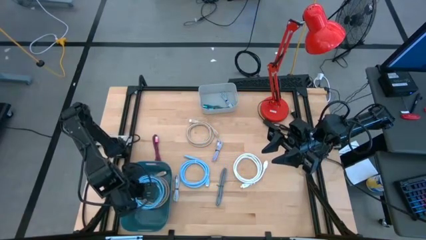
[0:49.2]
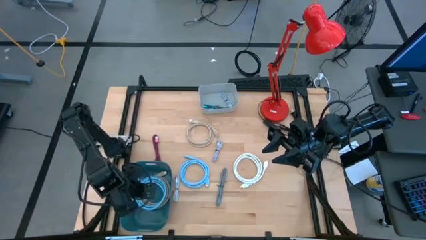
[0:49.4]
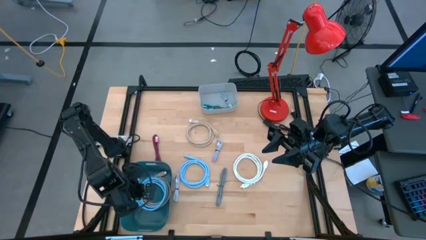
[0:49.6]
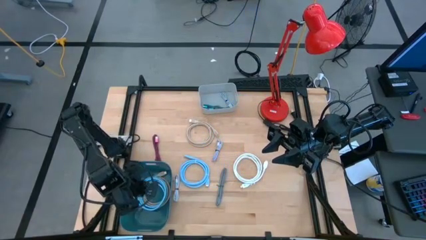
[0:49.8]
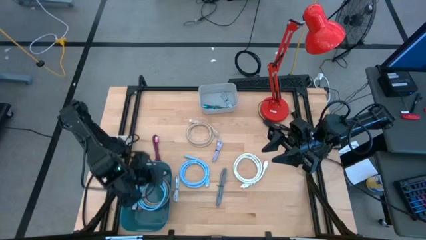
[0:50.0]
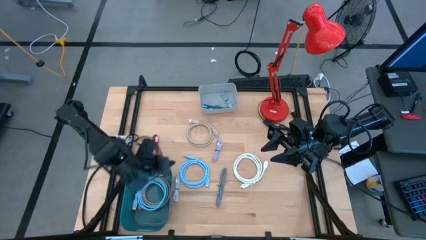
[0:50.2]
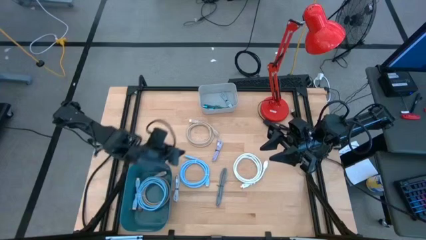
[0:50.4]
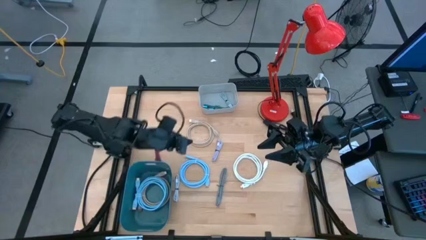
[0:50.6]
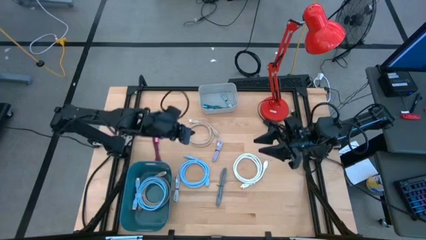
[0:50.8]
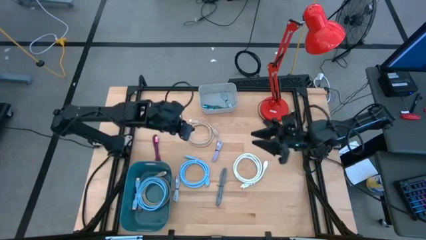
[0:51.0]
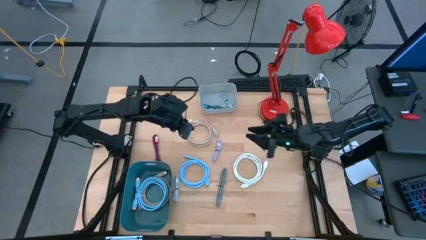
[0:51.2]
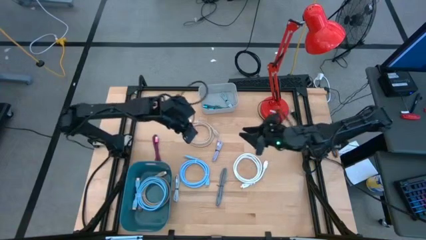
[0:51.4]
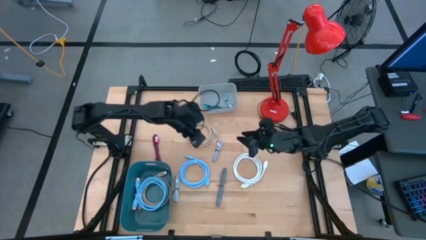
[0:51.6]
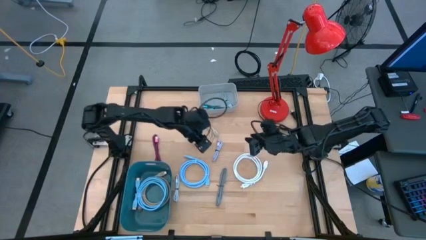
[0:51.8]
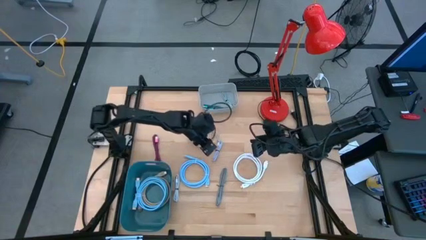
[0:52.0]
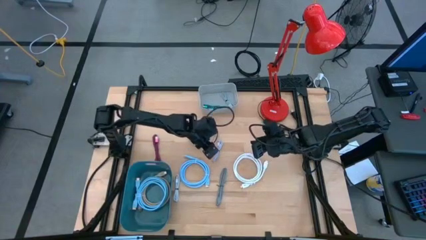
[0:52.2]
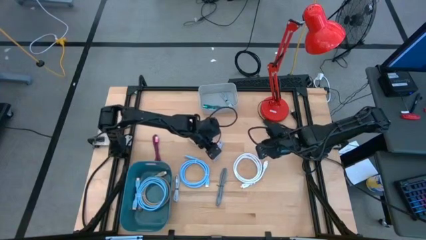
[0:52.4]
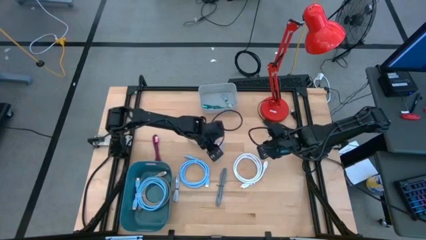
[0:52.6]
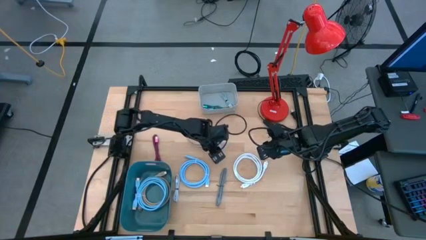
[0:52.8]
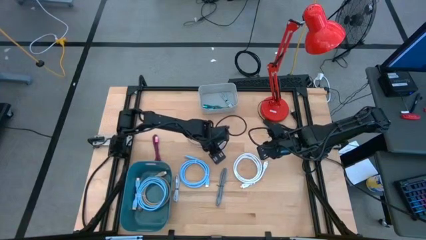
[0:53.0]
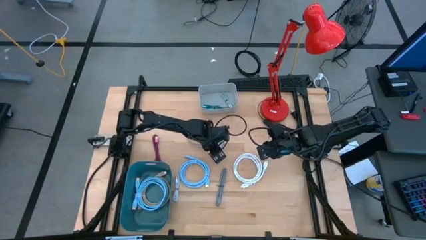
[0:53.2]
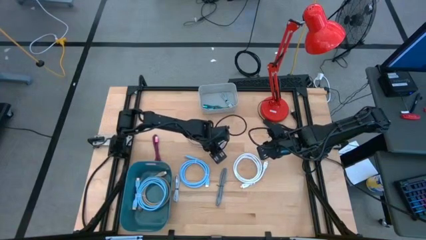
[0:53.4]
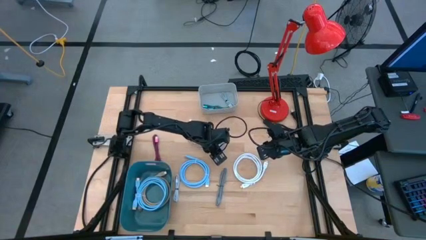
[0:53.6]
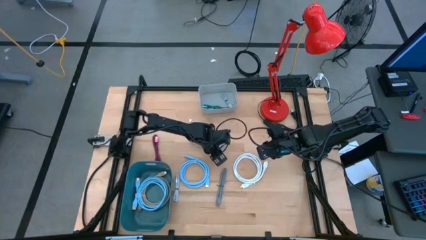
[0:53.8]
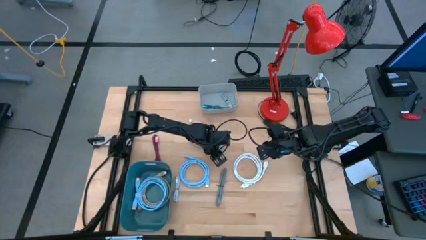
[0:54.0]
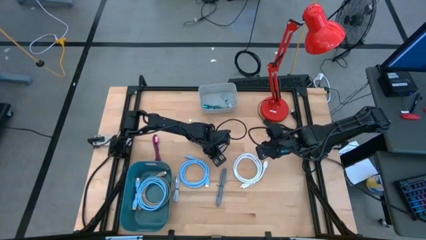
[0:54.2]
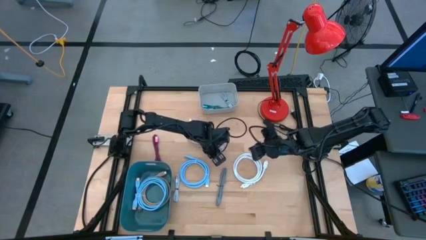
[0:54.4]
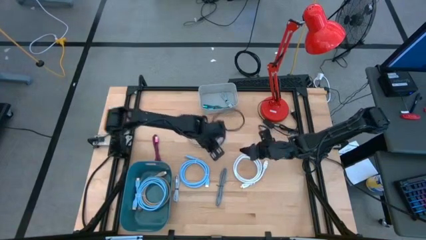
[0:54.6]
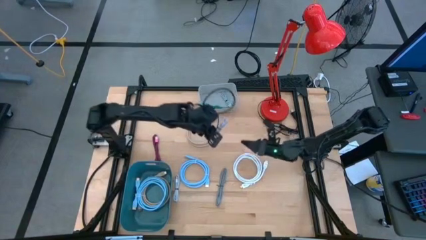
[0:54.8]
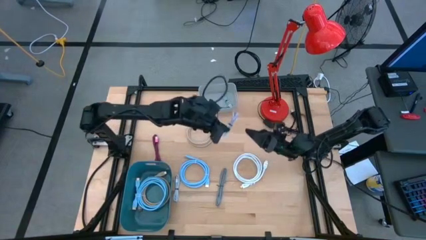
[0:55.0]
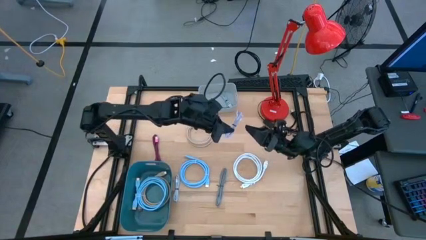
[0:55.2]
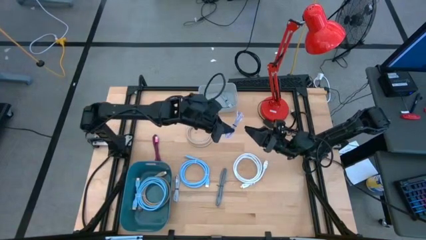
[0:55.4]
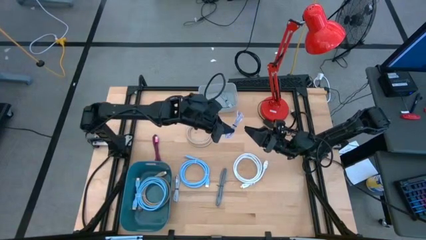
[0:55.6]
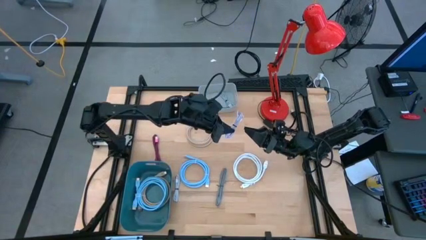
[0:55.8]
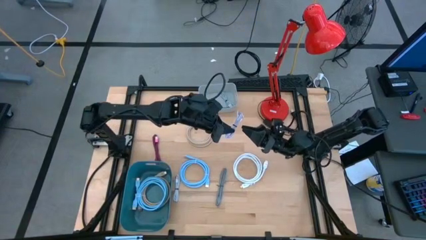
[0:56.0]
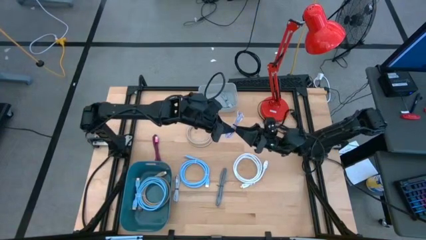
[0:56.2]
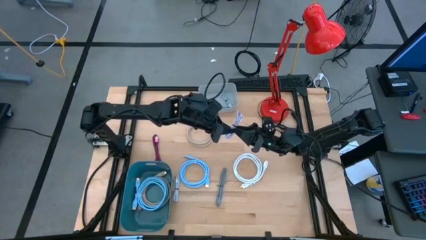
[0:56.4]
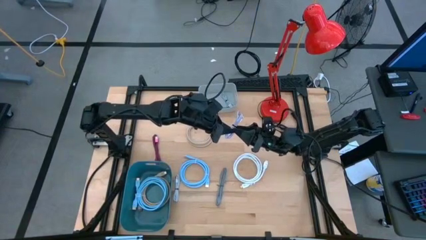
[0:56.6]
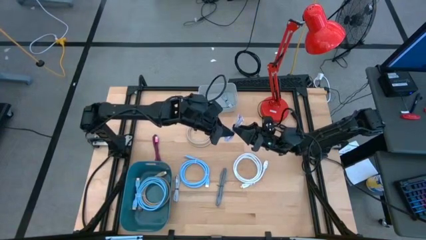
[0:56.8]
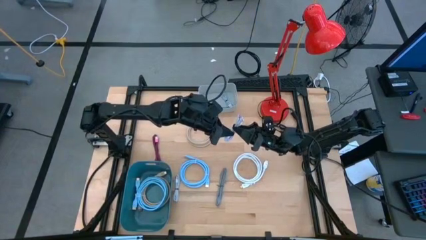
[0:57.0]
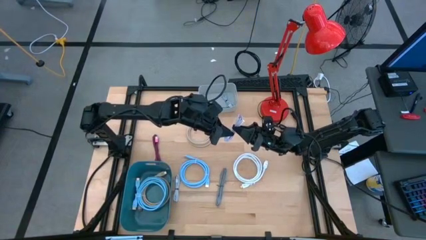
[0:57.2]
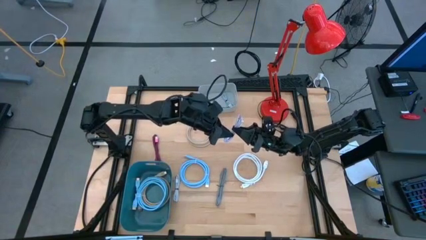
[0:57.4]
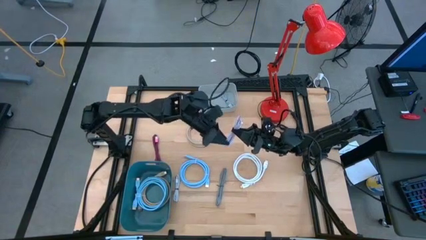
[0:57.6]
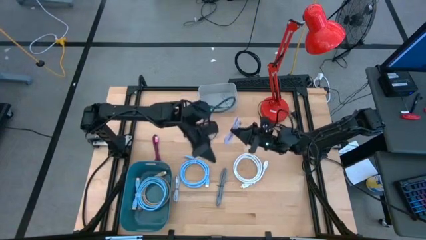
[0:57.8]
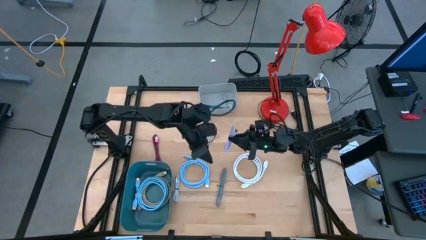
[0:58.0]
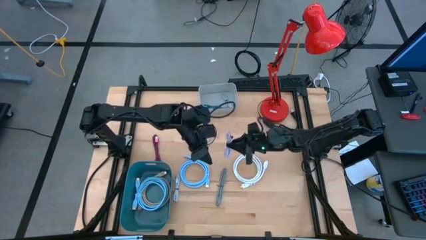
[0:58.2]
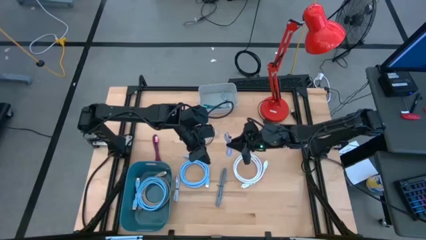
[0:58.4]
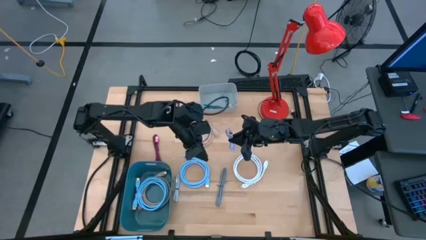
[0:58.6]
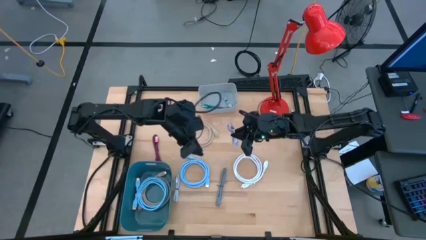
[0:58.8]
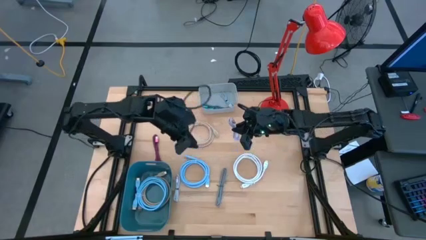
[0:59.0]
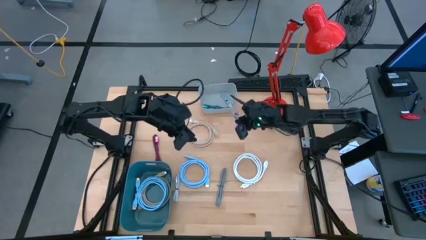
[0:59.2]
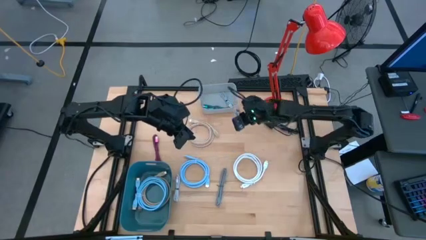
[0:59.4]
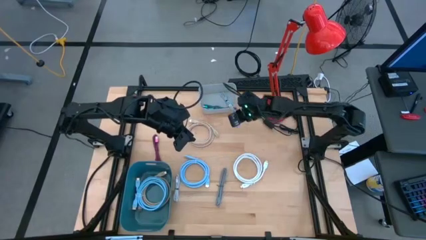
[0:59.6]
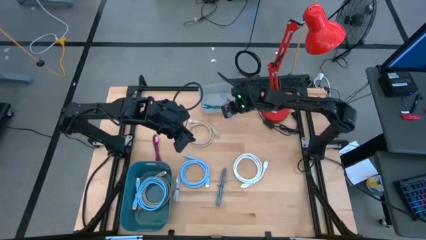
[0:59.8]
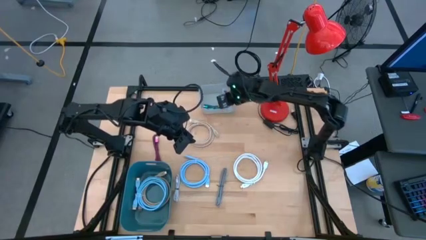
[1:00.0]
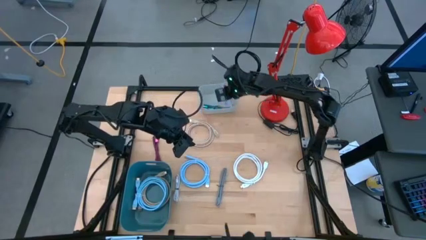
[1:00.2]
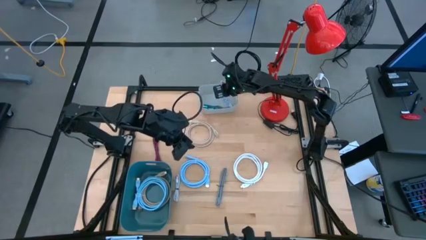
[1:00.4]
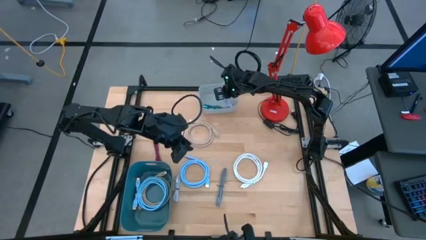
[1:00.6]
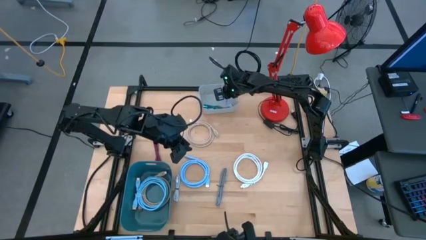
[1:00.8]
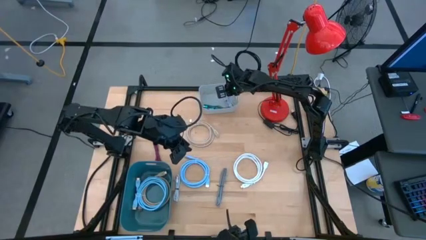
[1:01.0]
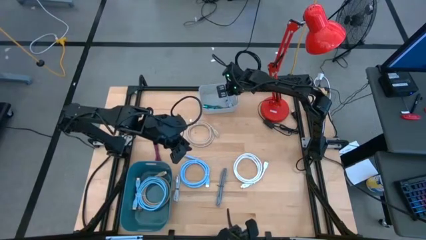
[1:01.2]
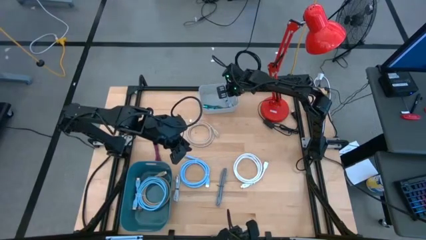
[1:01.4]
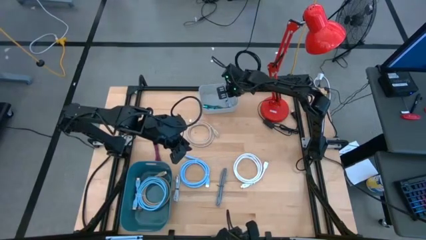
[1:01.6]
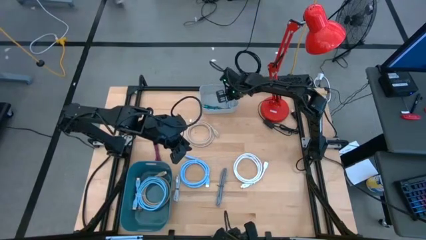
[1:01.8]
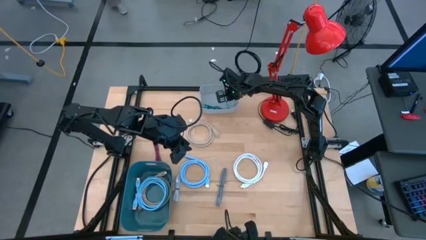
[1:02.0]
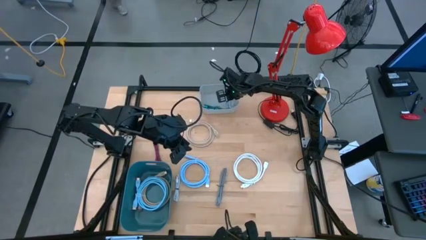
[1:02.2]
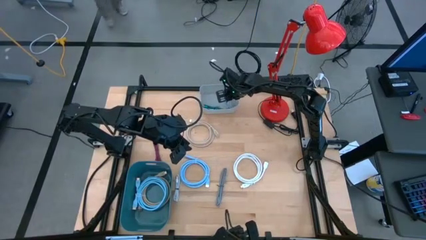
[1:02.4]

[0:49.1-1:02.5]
Task: Pick & Place USB Port
Put the purple charger cable into the gray bin

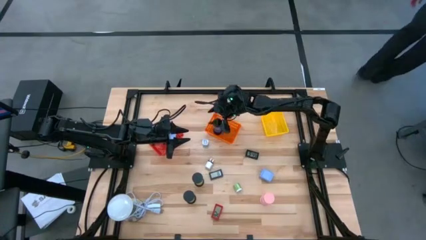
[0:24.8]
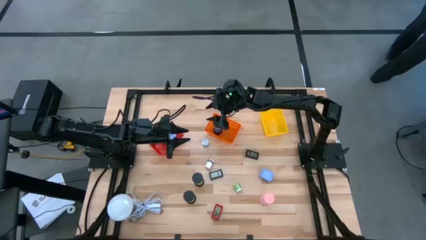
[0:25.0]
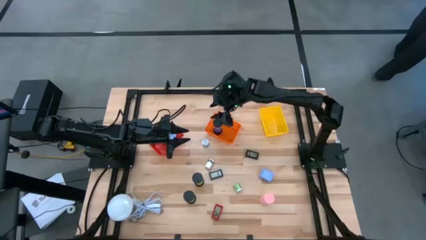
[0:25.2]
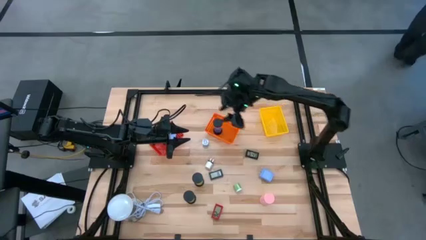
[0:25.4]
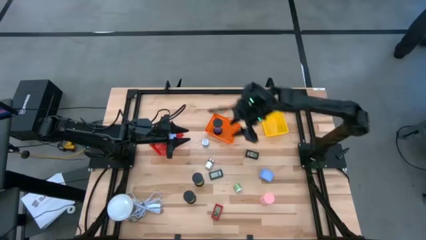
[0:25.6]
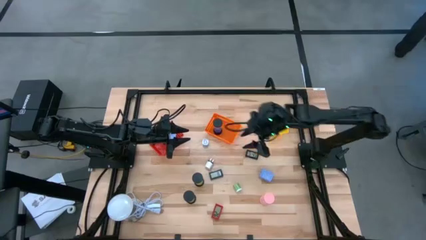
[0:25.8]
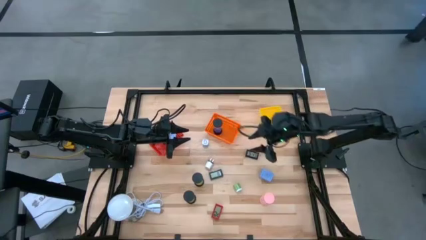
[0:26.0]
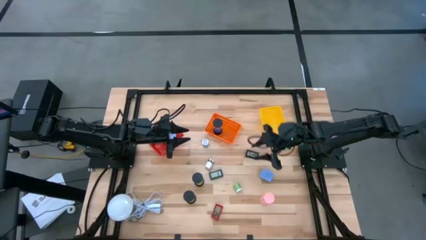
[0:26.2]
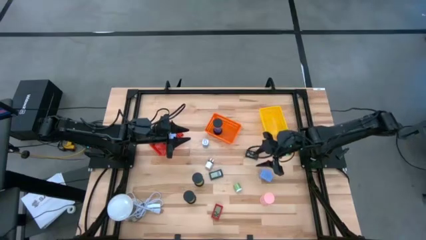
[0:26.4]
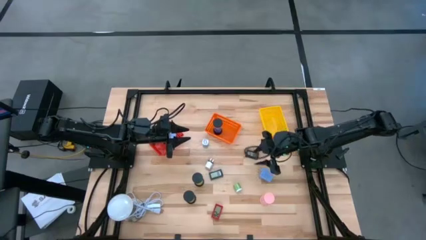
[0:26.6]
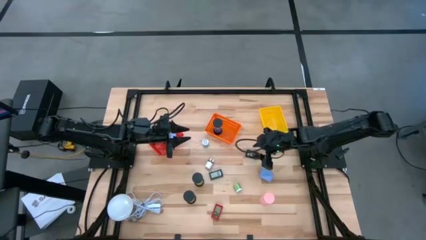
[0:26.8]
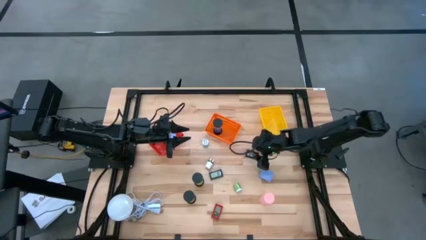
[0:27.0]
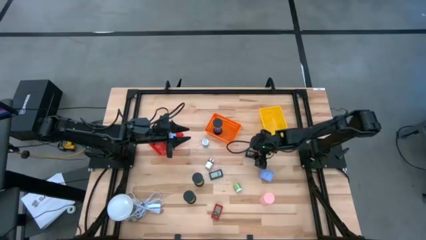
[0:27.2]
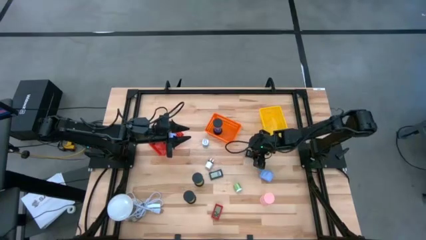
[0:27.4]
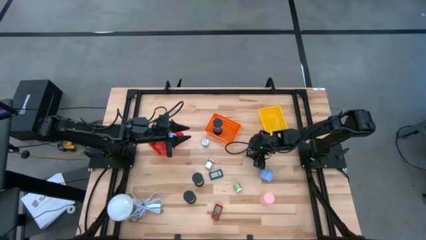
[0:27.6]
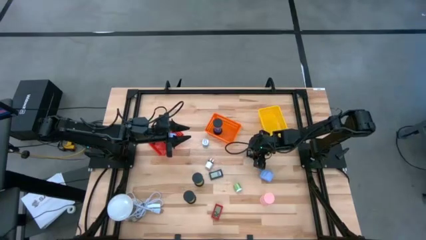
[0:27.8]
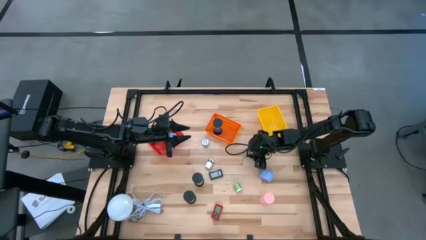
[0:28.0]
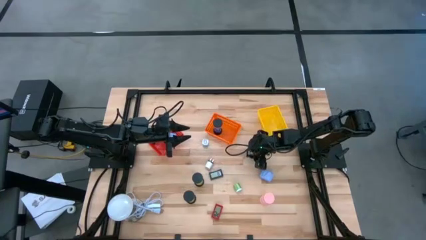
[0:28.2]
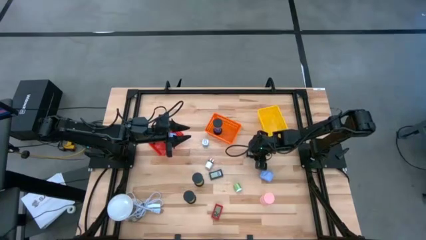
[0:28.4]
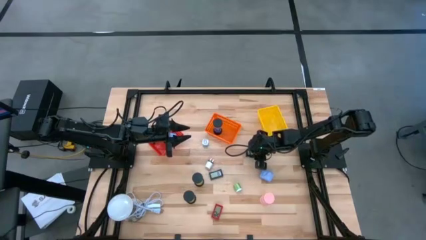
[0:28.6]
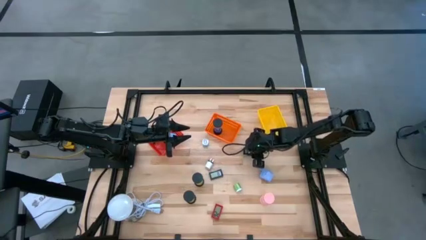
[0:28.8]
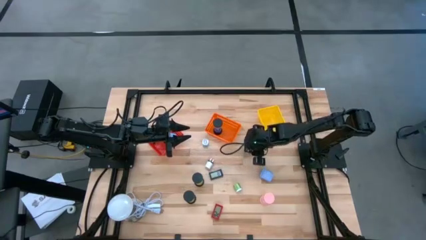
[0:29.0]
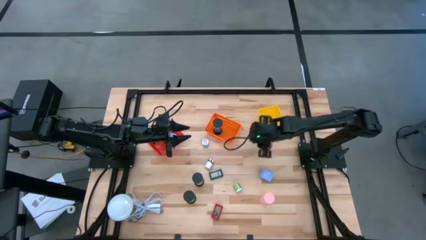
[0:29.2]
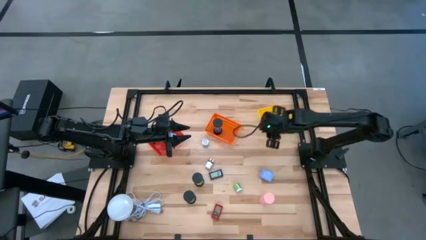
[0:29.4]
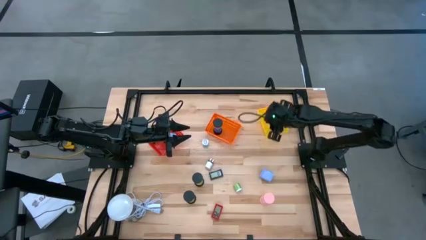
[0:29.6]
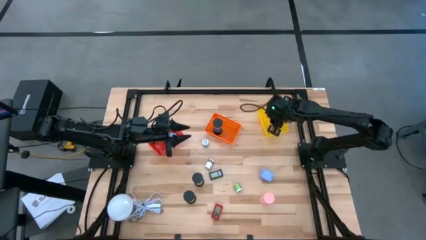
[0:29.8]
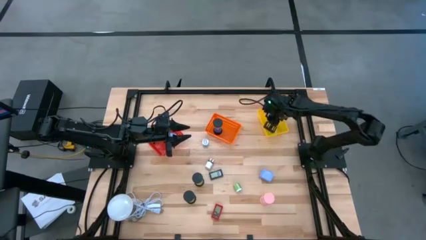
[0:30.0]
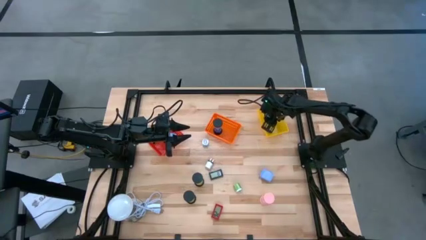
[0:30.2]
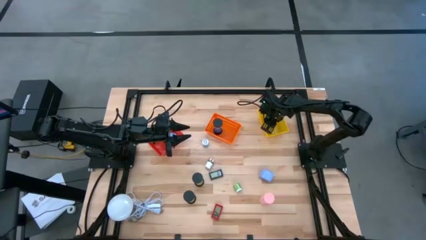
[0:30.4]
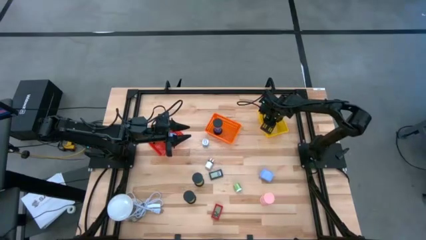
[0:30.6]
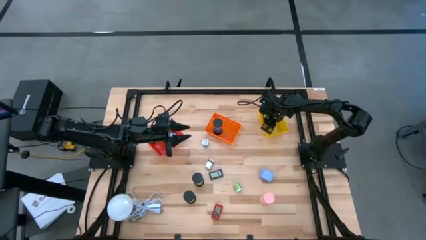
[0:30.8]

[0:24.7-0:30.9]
Task: Pick & Place Office items
Put the right black digital timer into the yellow basket
